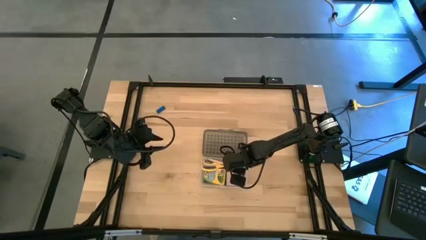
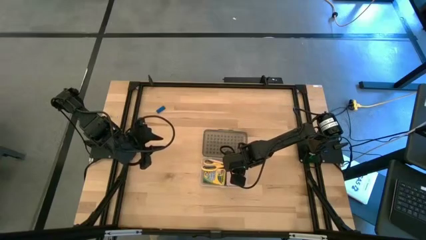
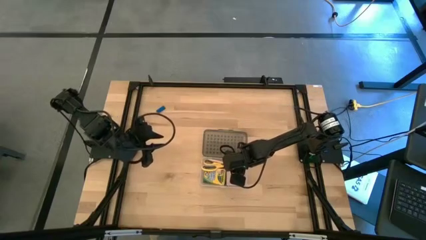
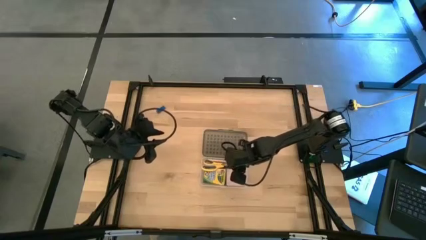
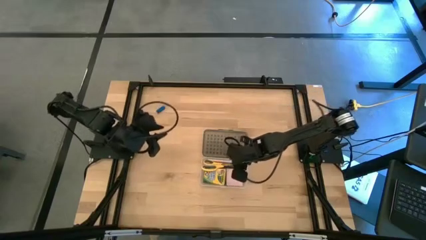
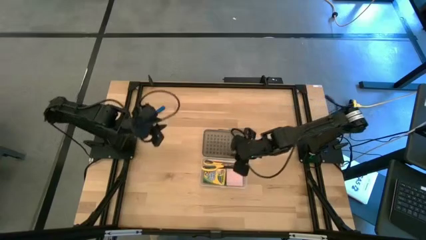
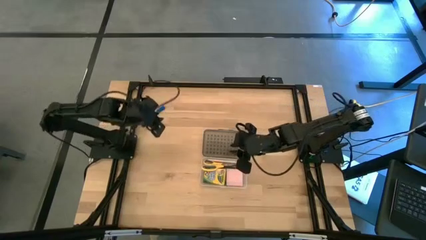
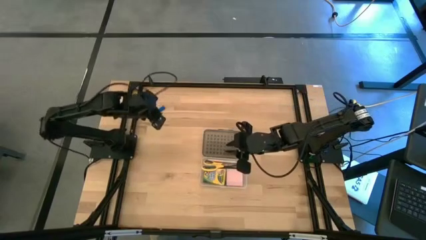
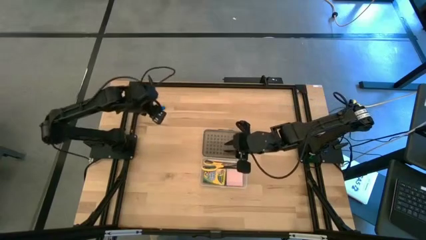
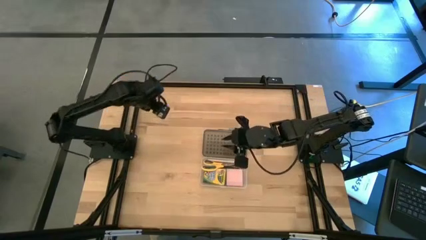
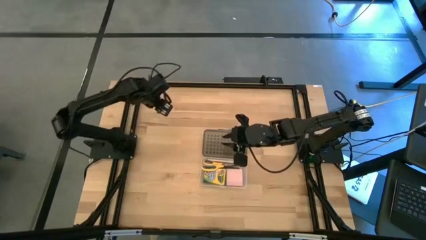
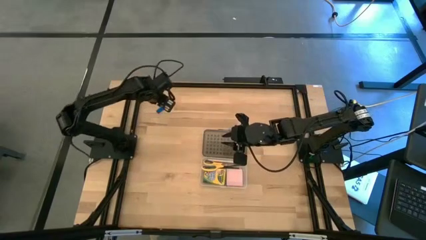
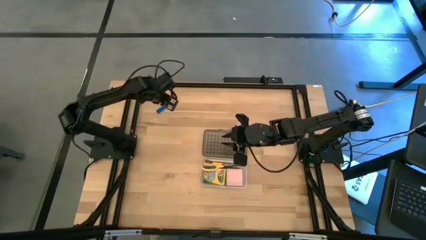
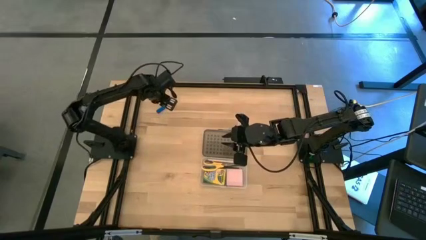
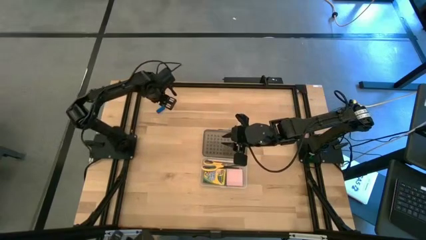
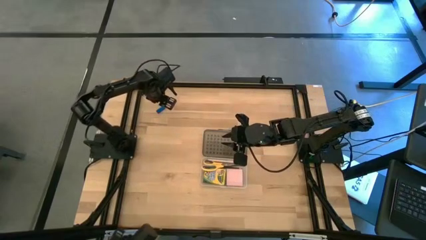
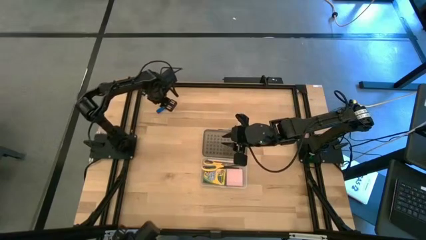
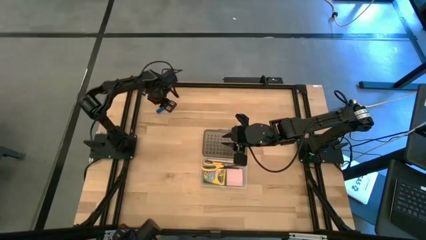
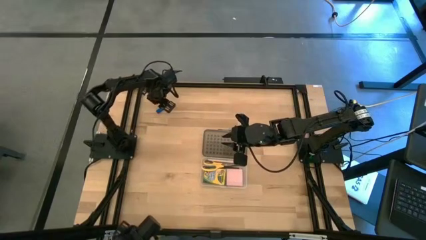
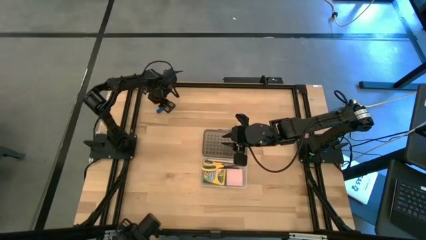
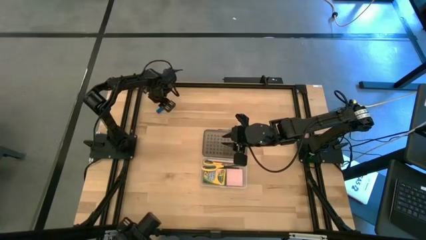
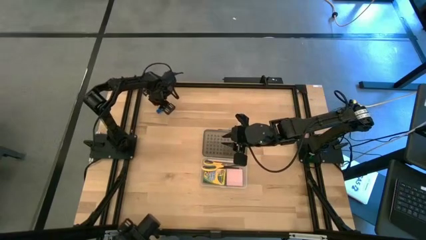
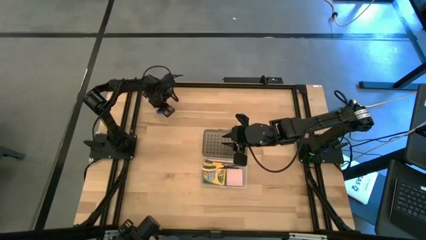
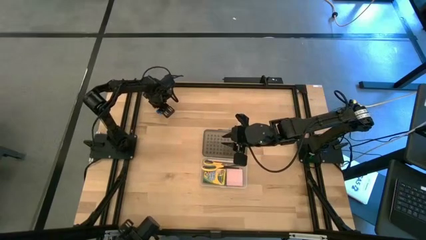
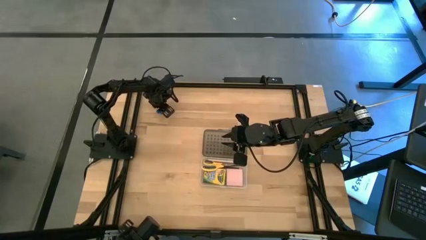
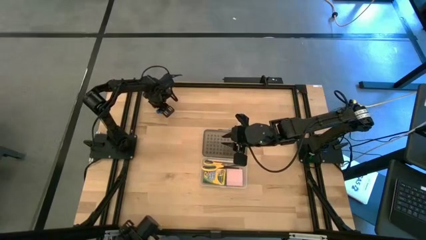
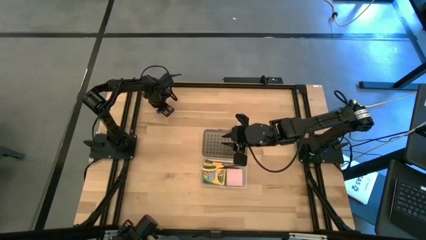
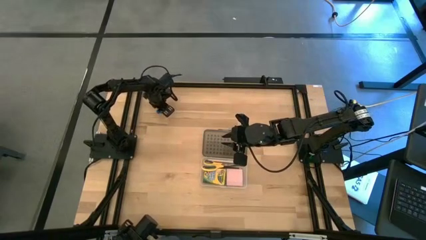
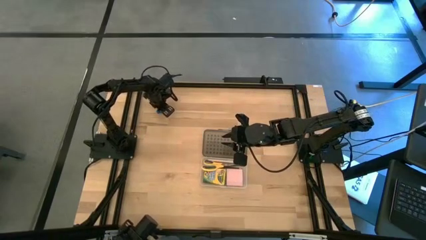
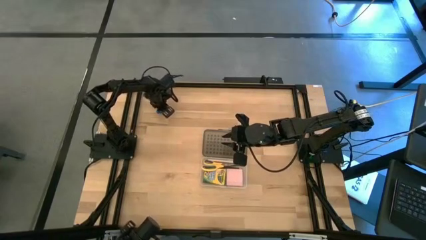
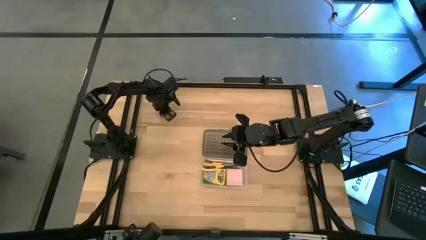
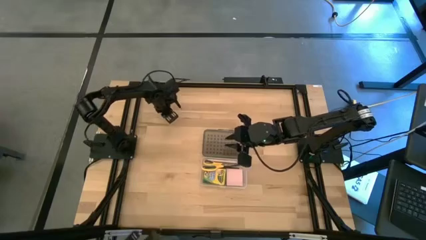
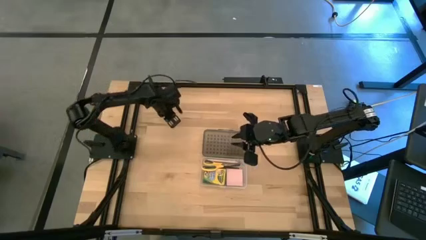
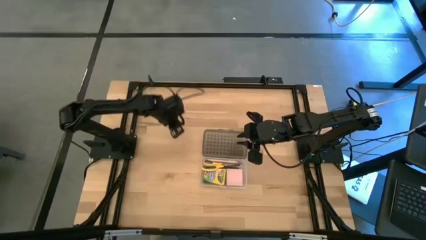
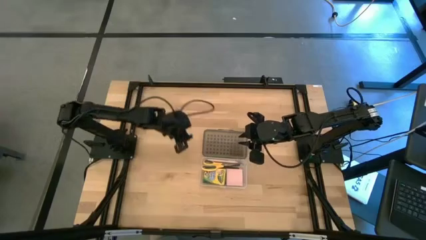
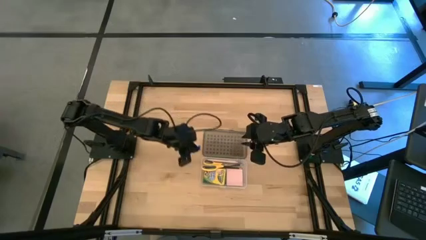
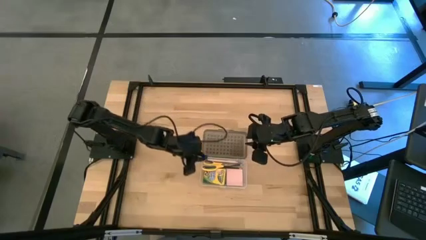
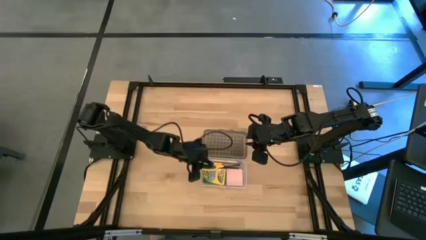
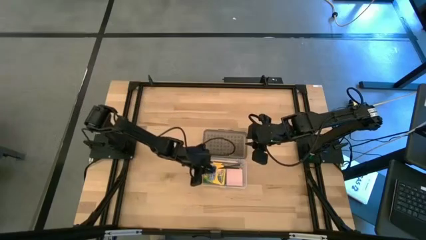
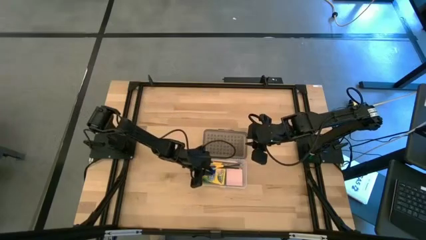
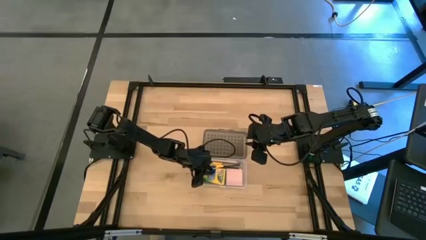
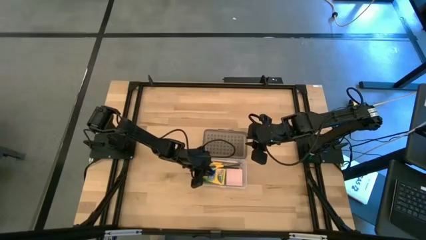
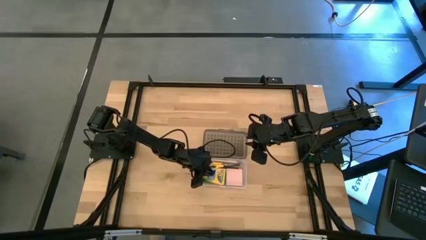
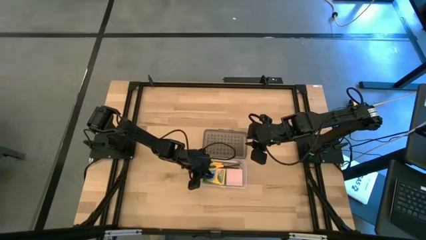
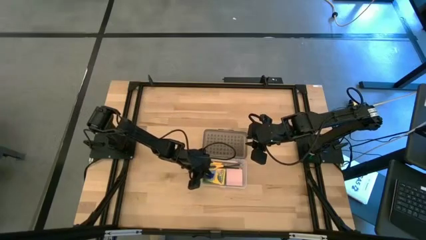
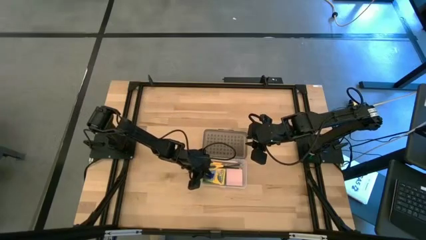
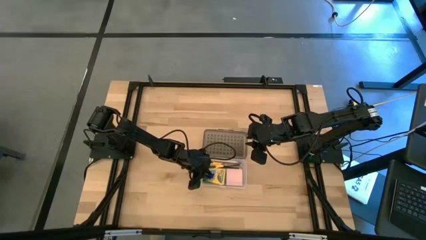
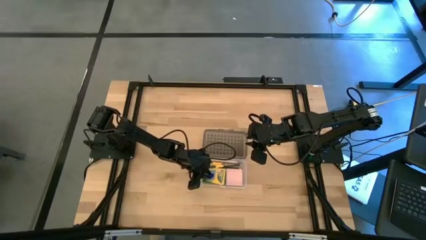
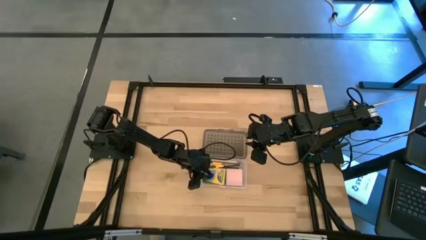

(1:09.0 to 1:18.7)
Task: Pack school essentials
Put the blue eraser into the transparent supply box

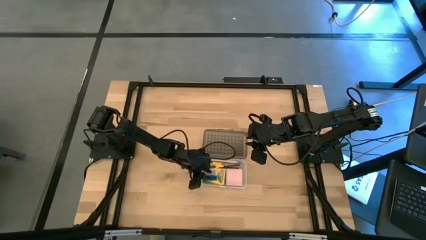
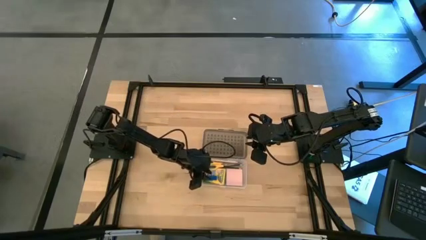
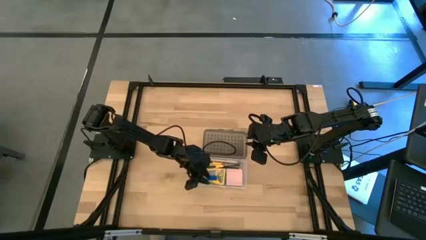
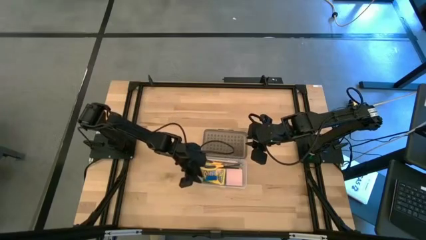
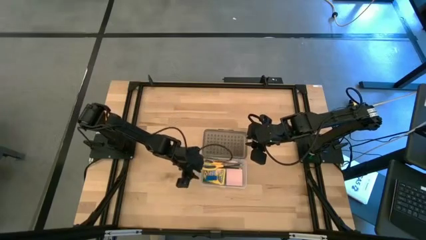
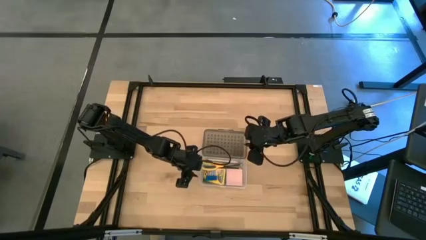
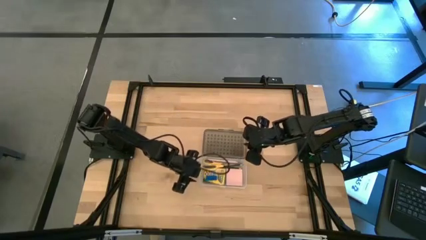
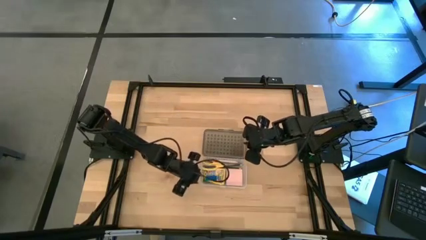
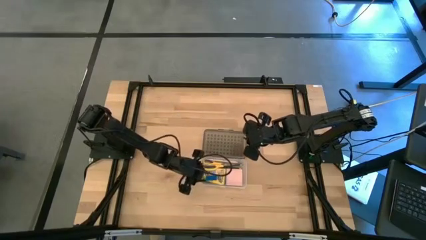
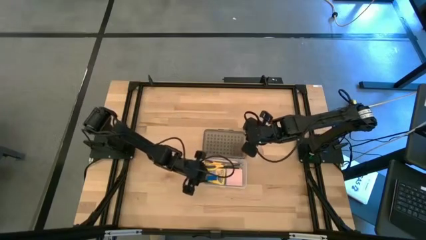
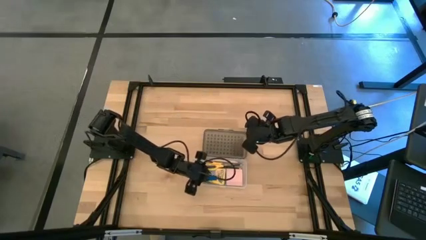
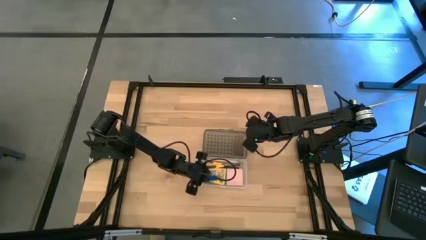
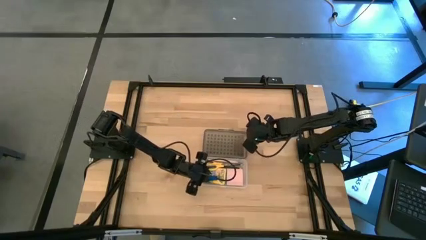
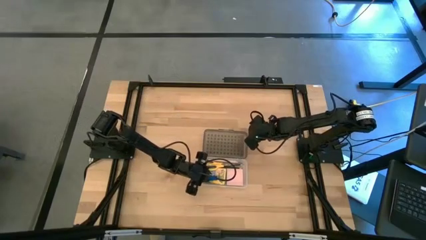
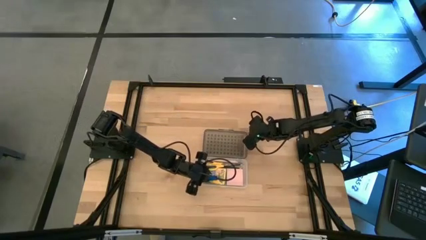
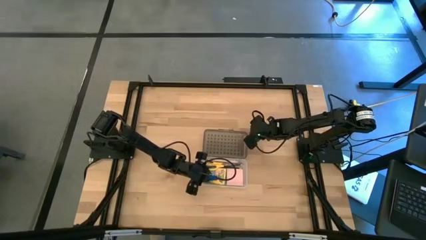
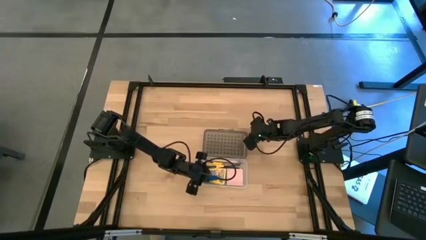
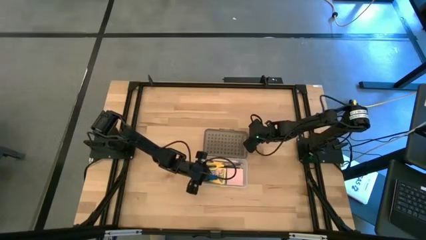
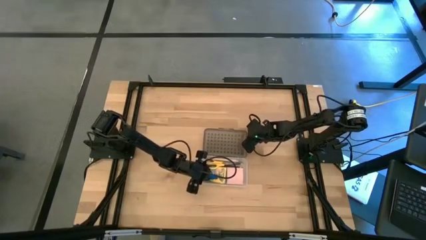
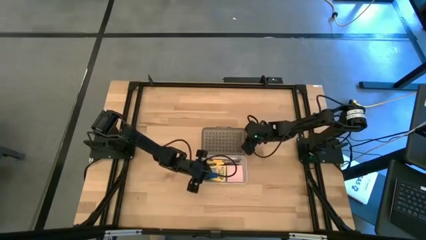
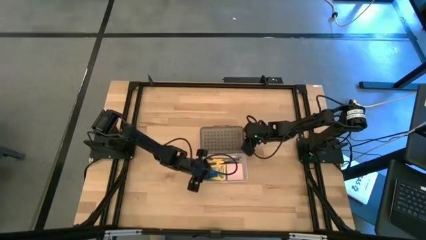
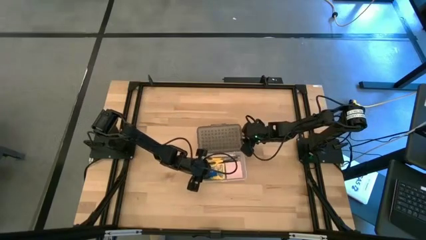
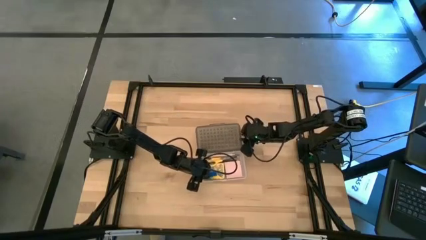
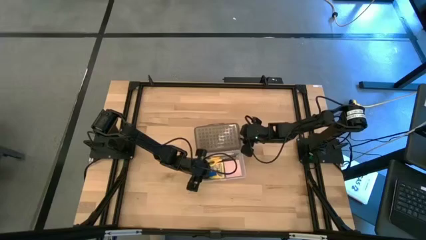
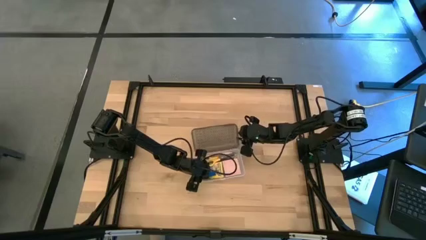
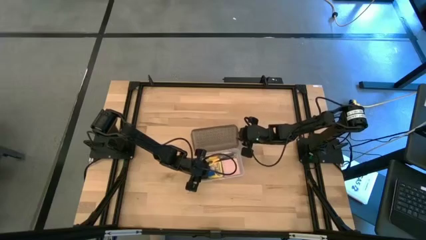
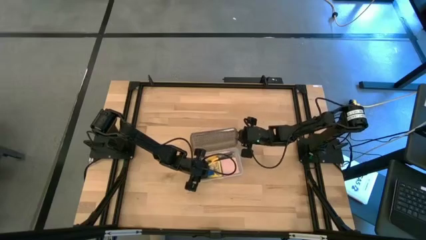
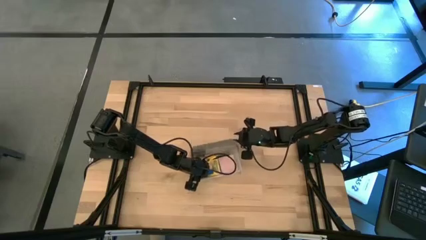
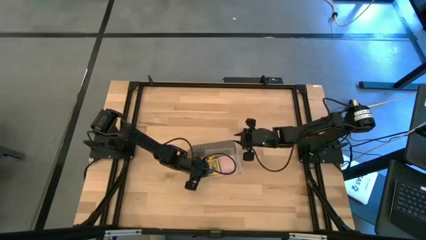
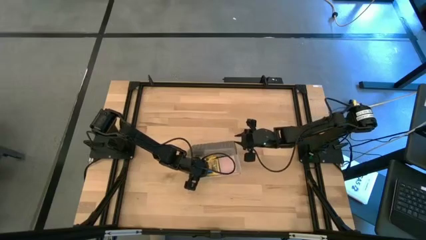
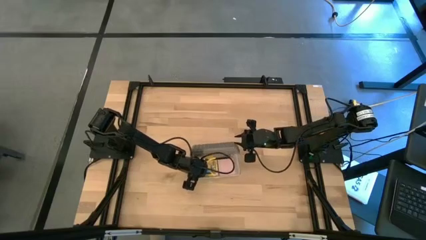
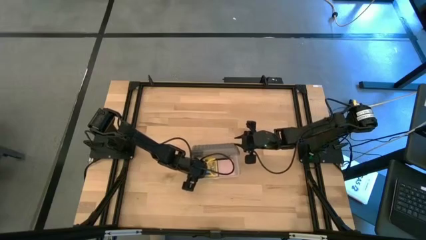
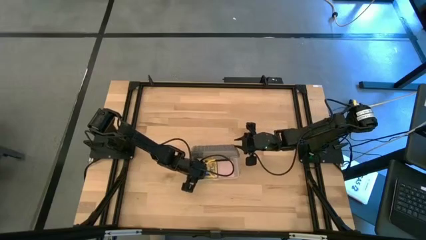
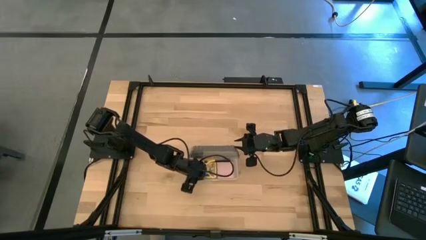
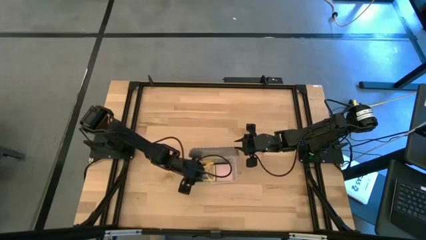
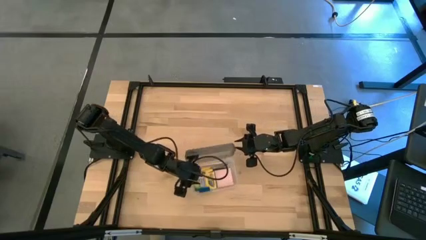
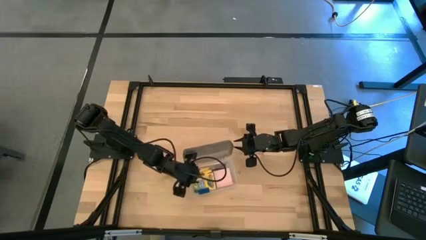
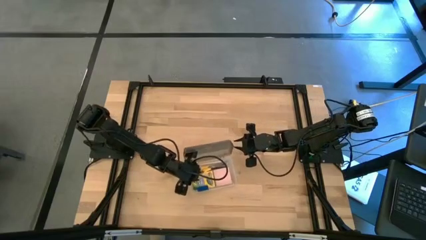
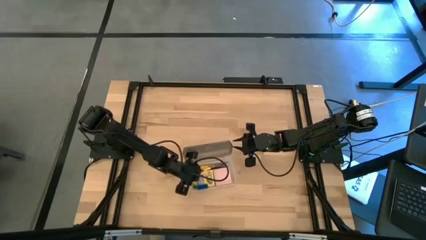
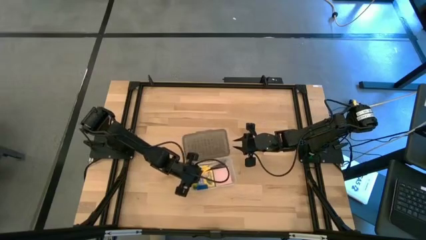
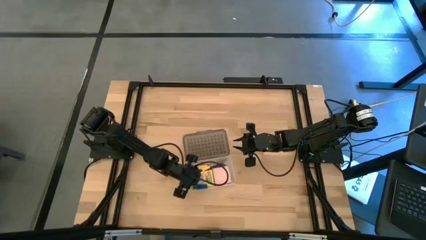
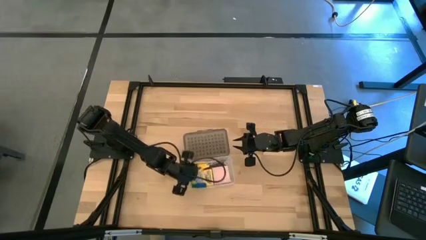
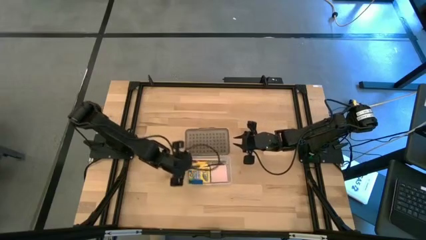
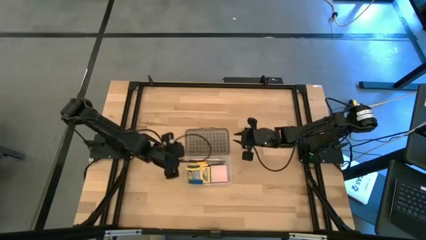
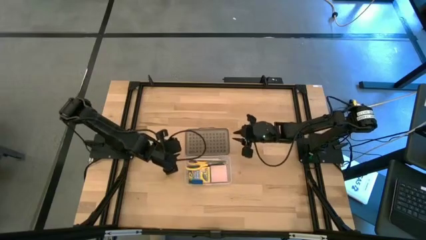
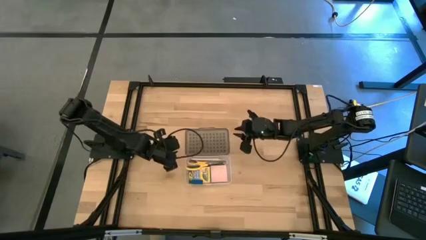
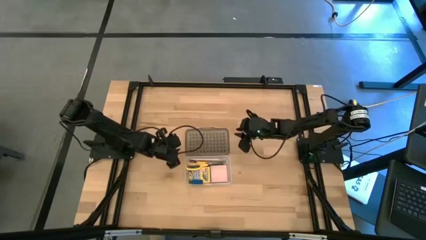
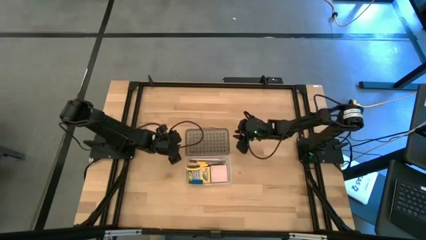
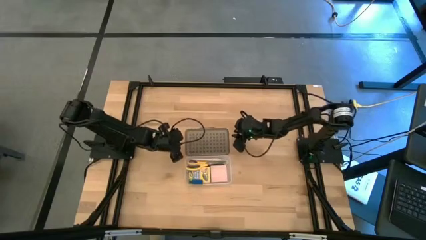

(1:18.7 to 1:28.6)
Close the transparent supply box
